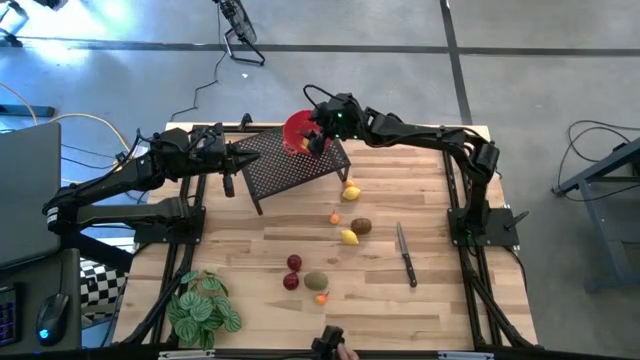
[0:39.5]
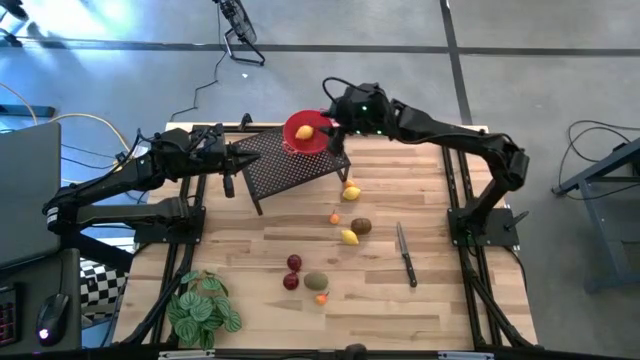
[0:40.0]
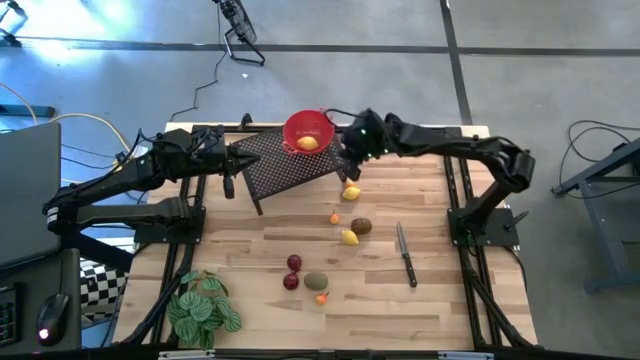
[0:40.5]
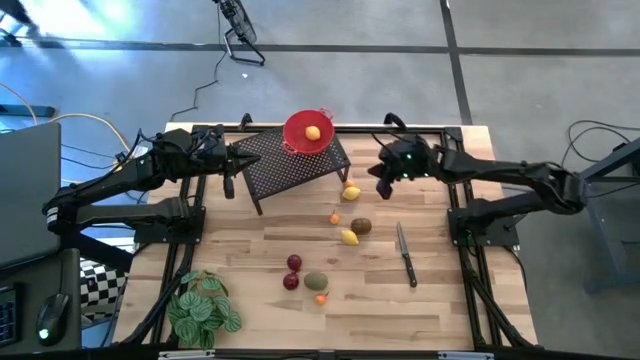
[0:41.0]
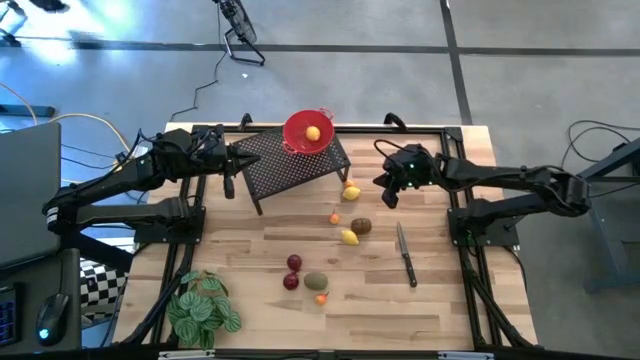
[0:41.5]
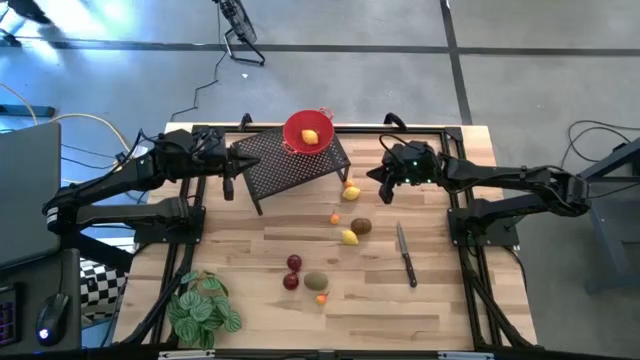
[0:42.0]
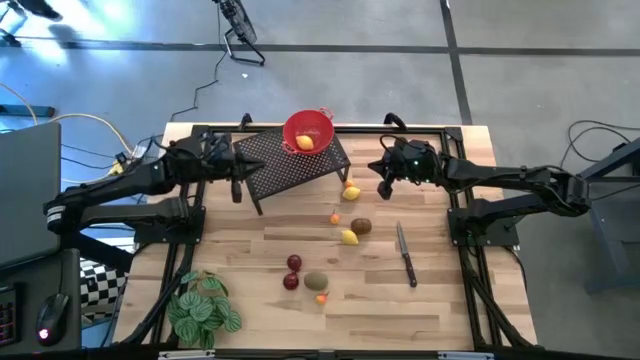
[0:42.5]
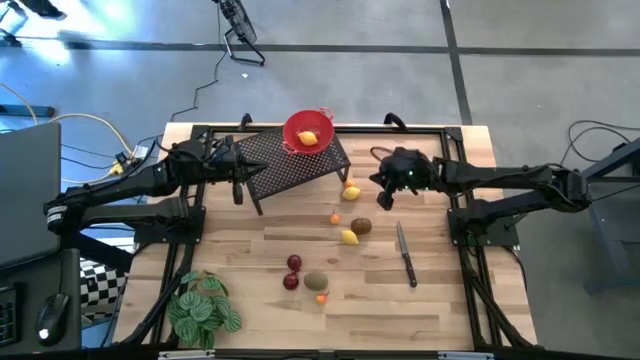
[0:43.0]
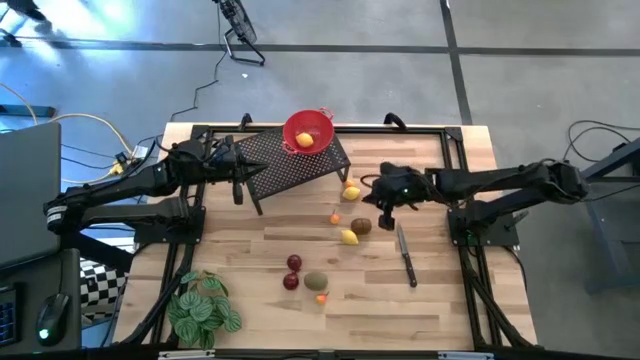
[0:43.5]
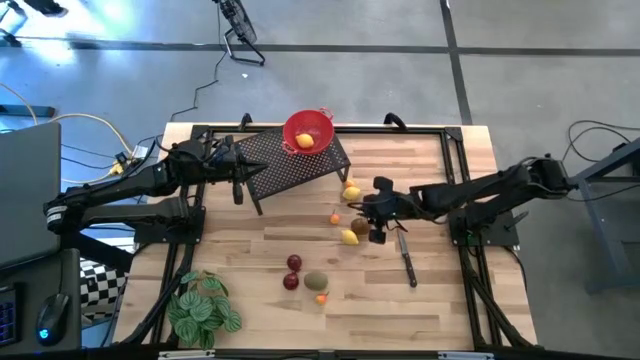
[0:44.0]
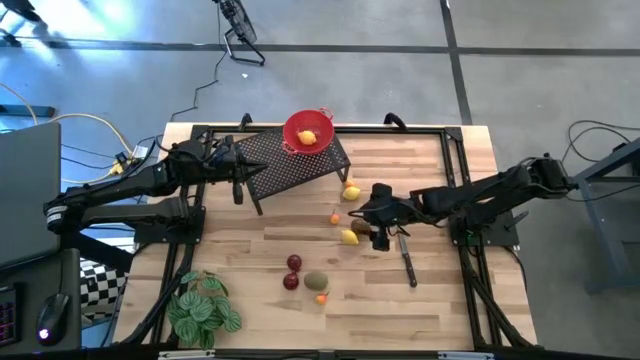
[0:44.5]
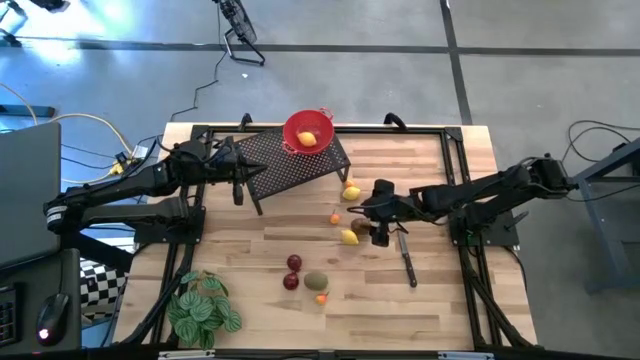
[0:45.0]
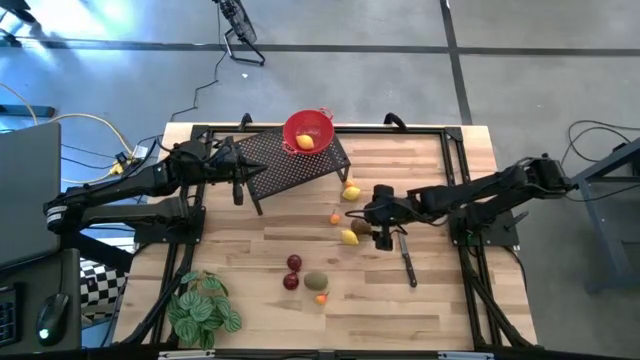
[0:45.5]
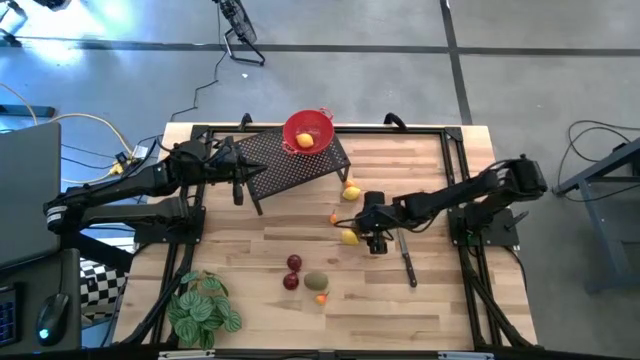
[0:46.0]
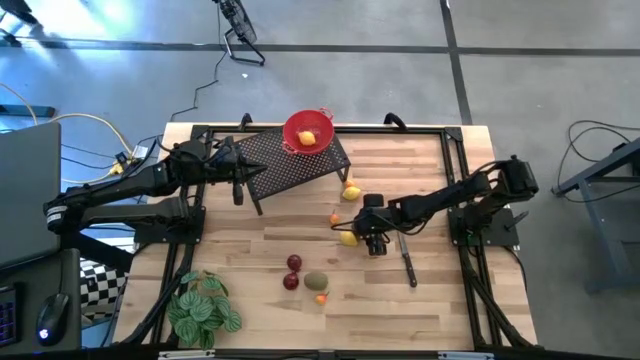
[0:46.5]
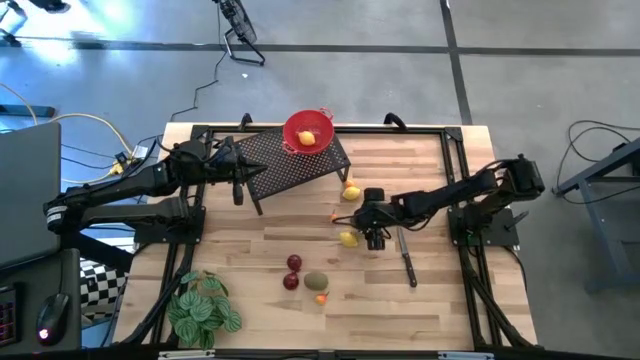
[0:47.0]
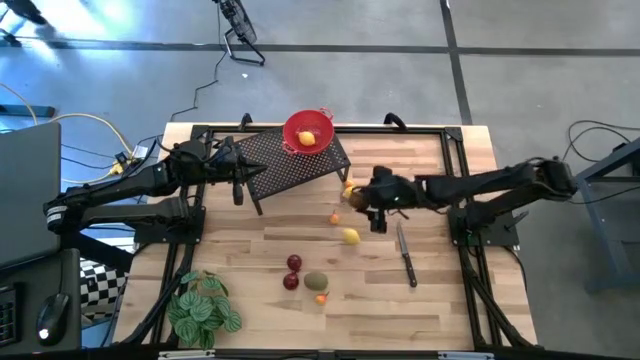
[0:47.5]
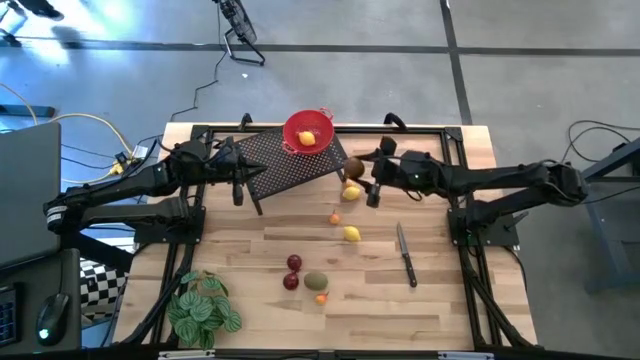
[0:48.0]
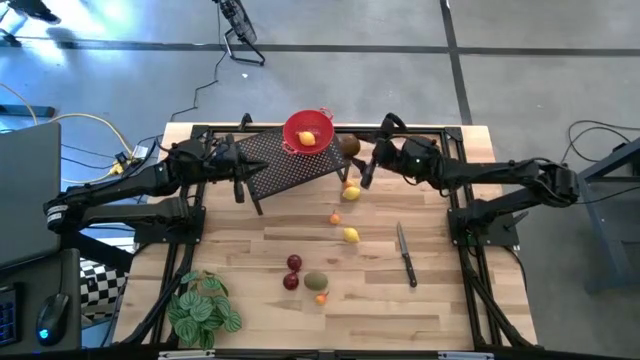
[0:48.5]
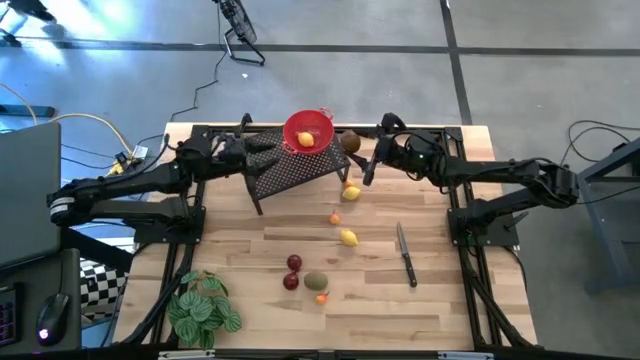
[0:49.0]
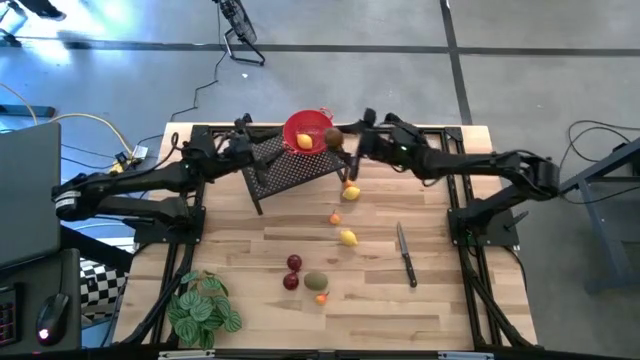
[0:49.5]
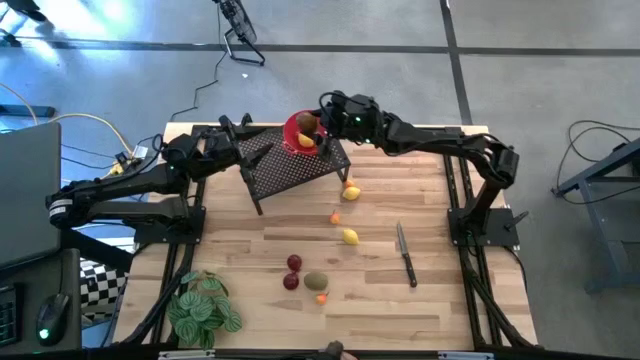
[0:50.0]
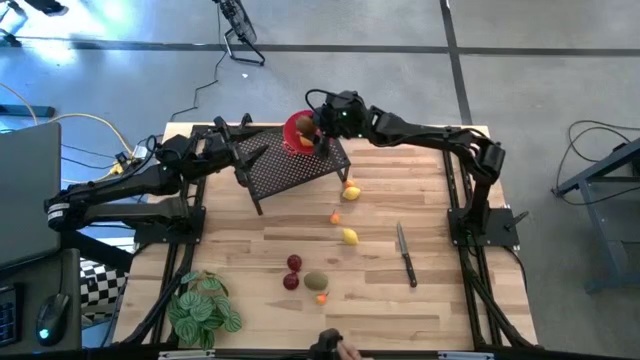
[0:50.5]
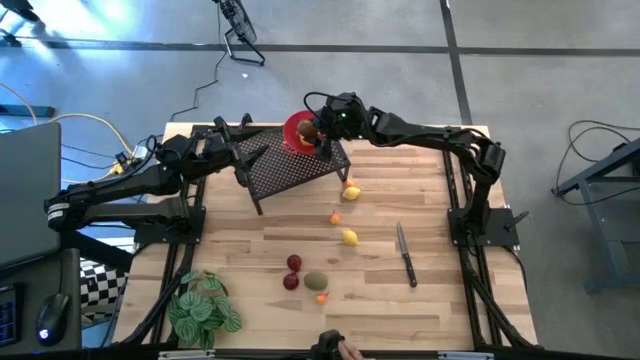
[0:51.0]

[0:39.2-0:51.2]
Task: Pick & Place Fruit
Put the top kiwi into the red strainer bowl on the shelf

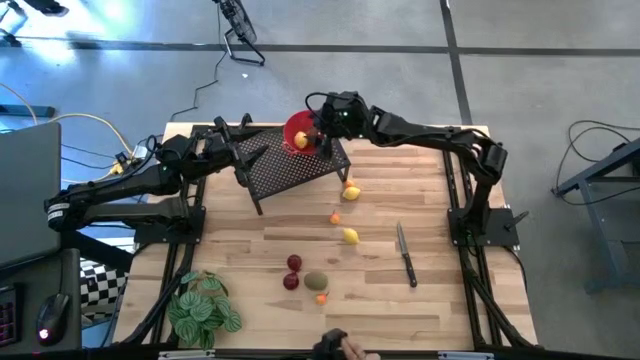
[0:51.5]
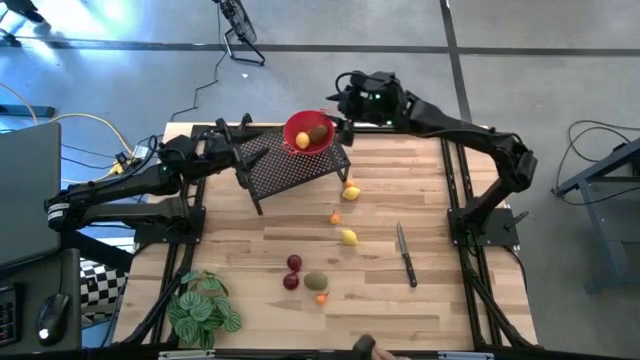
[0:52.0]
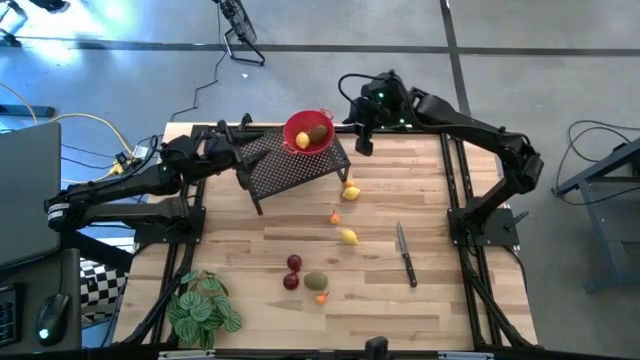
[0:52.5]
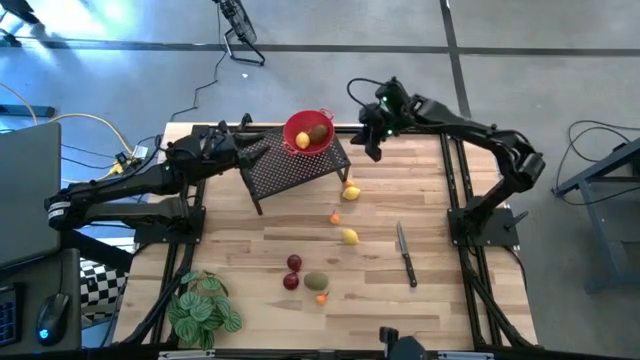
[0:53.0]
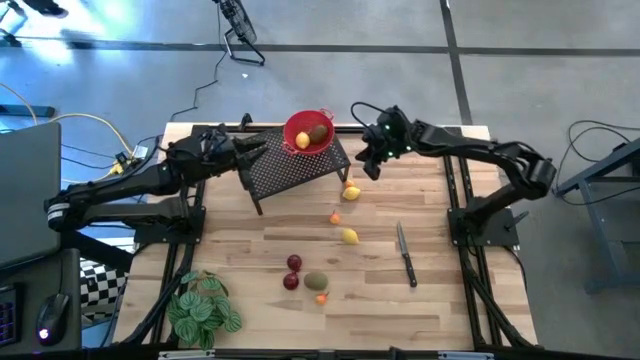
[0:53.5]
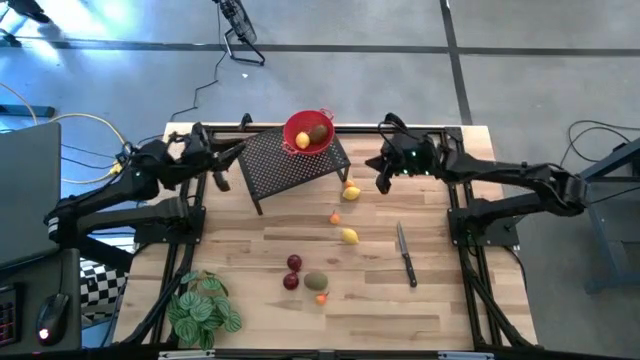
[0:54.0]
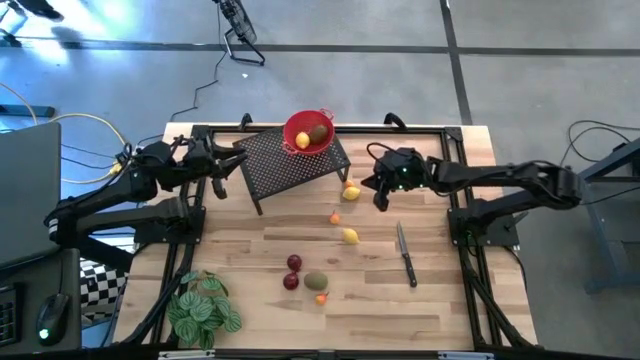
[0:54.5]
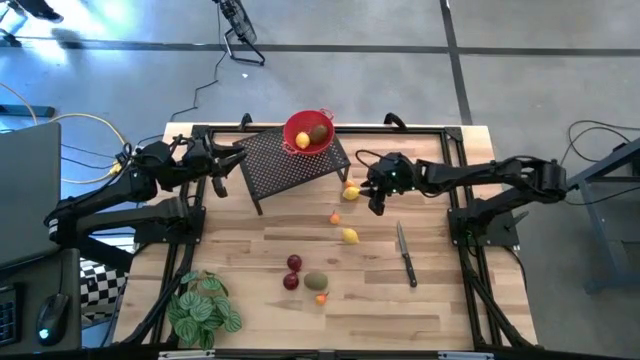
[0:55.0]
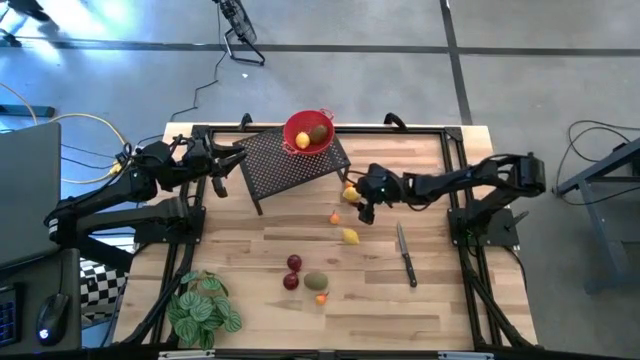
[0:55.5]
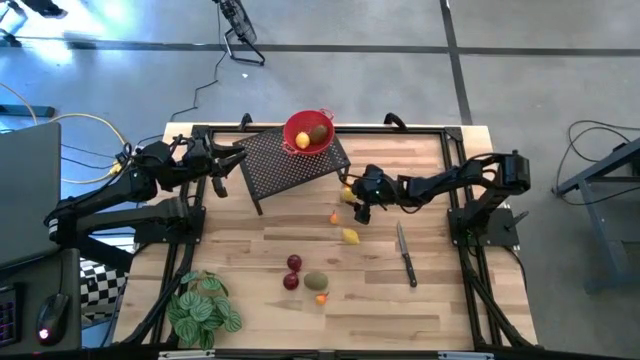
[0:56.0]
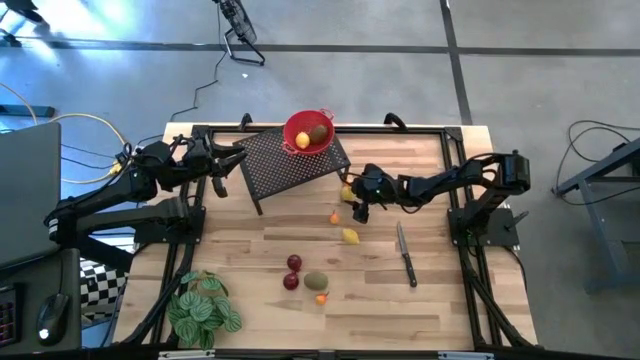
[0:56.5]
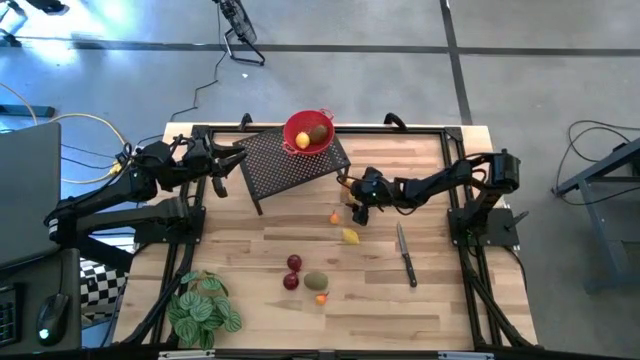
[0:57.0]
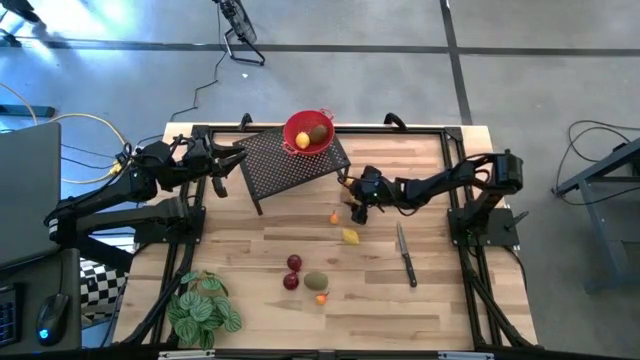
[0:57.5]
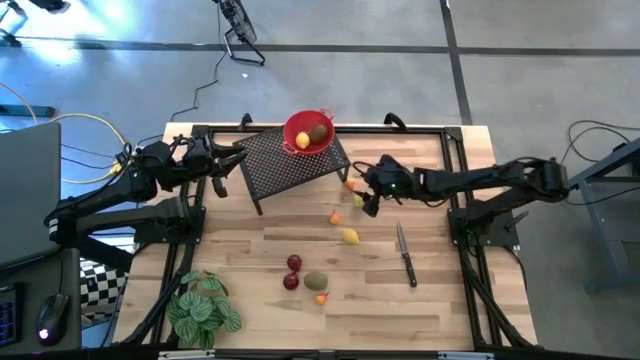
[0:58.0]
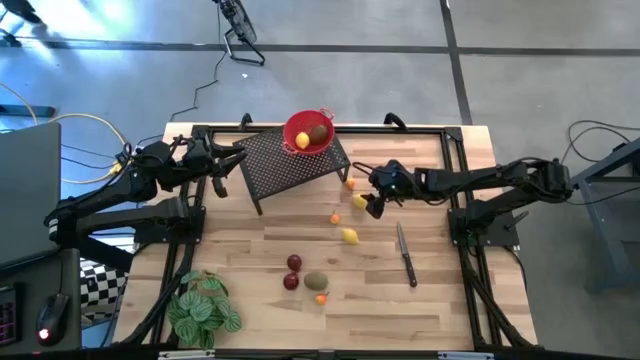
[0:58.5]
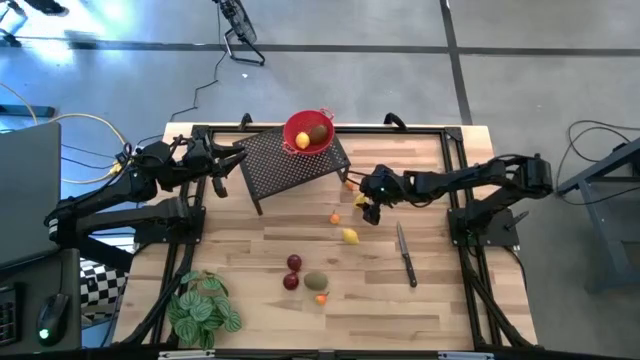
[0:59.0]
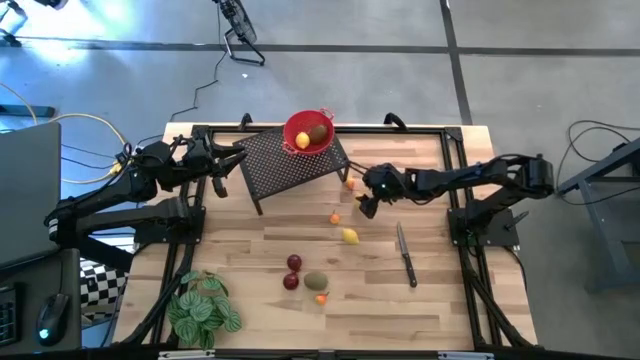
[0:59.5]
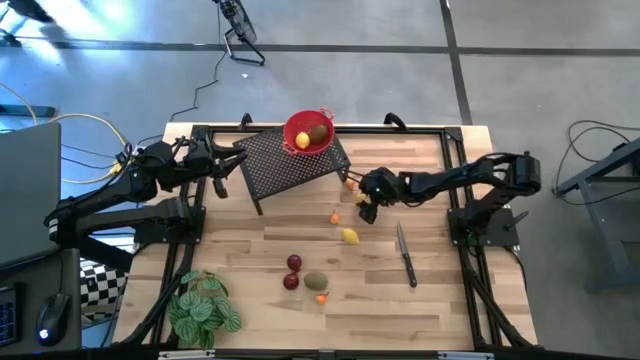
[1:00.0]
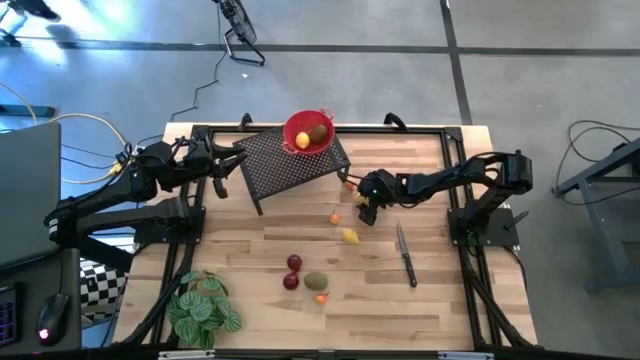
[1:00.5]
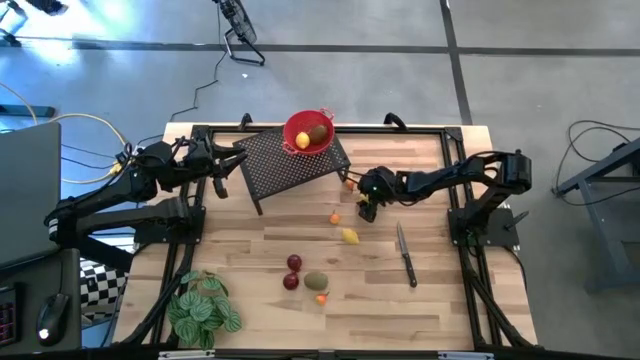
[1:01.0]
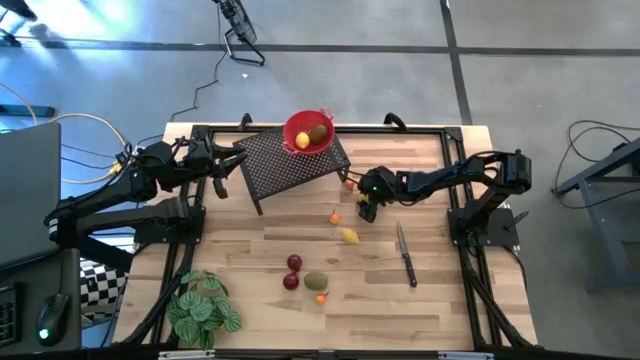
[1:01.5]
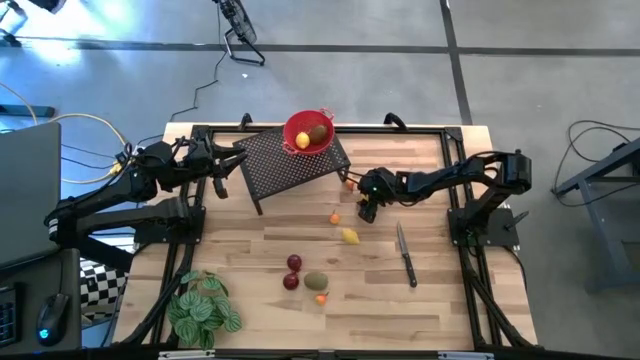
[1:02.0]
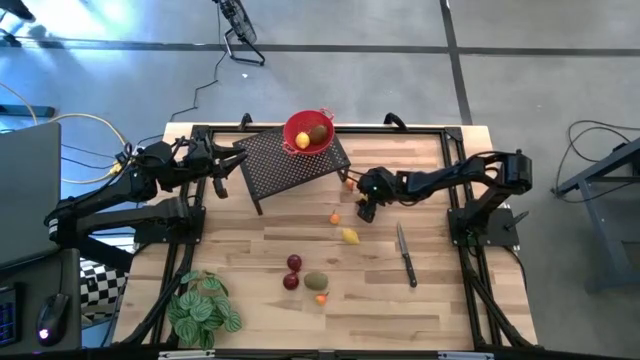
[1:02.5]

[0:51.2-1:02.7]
Put the top lemon into the red strainer bowl on the shelf
